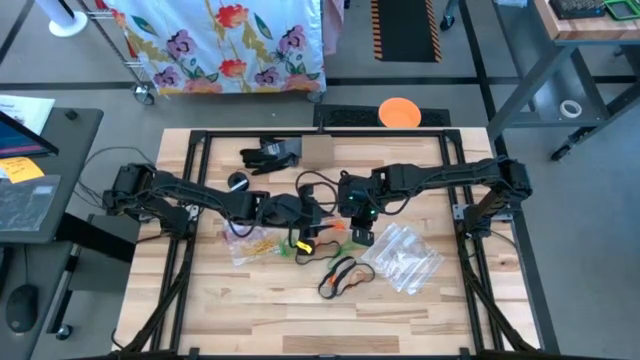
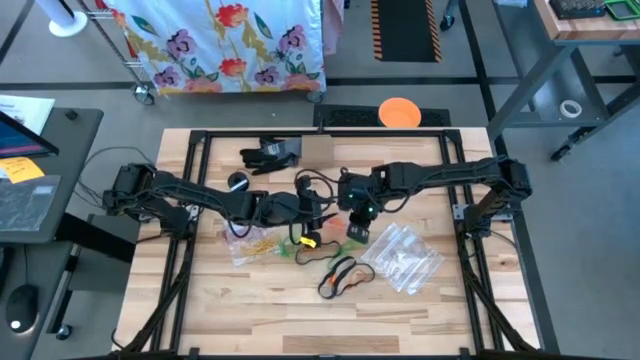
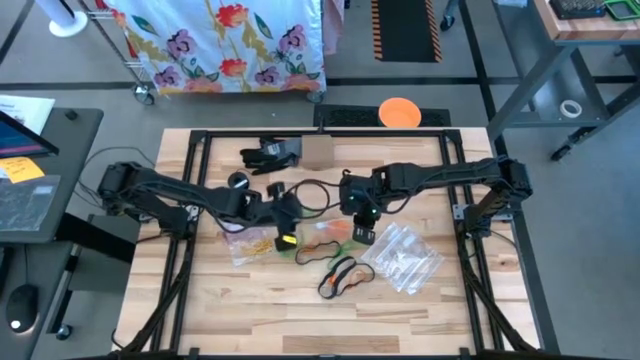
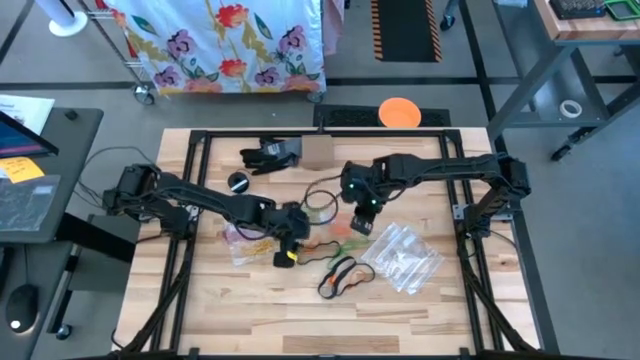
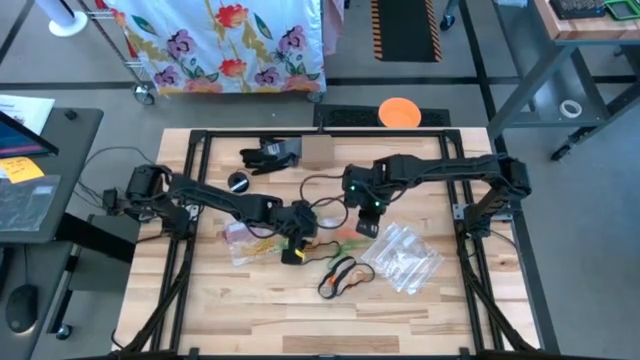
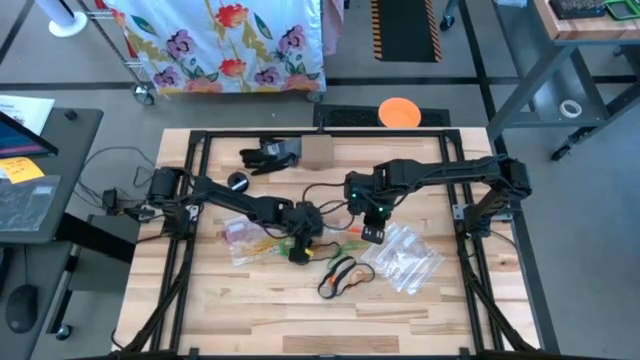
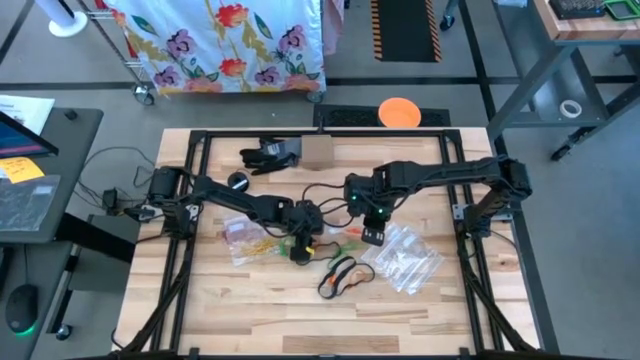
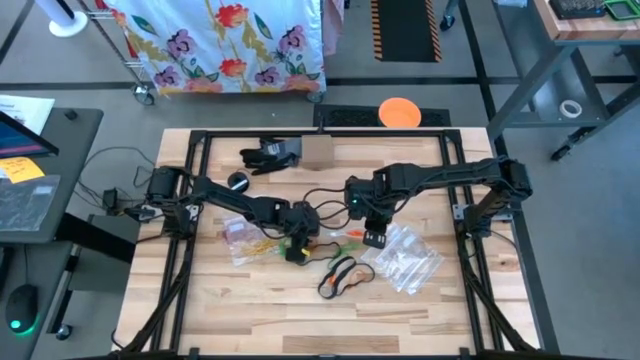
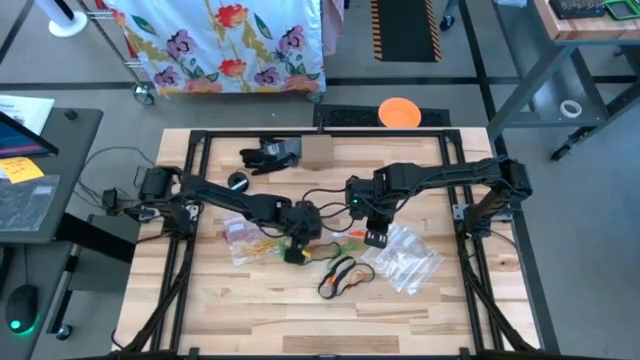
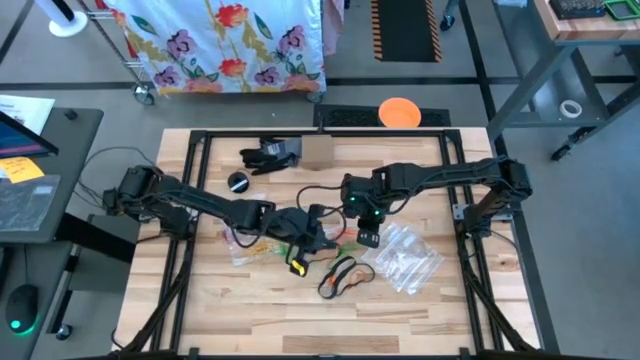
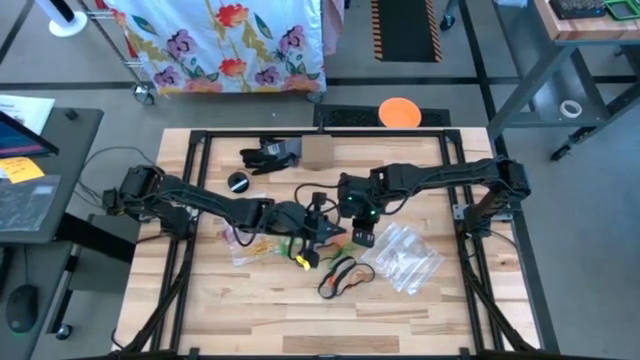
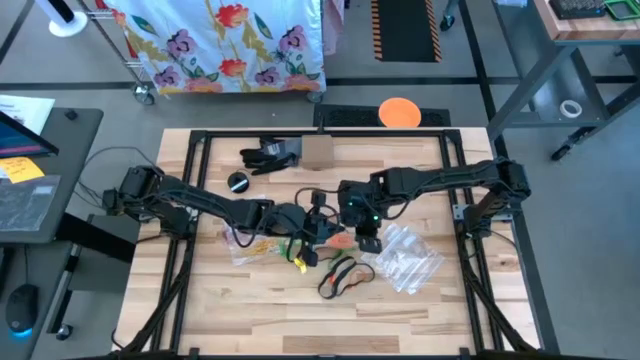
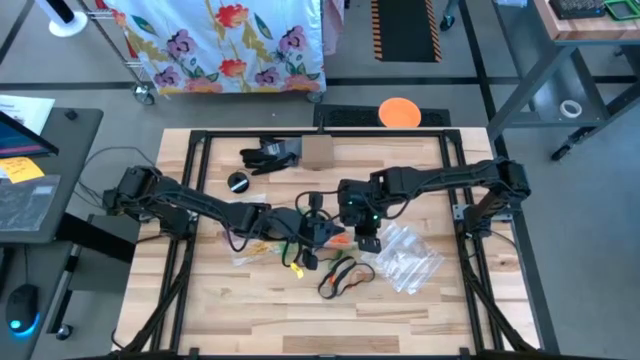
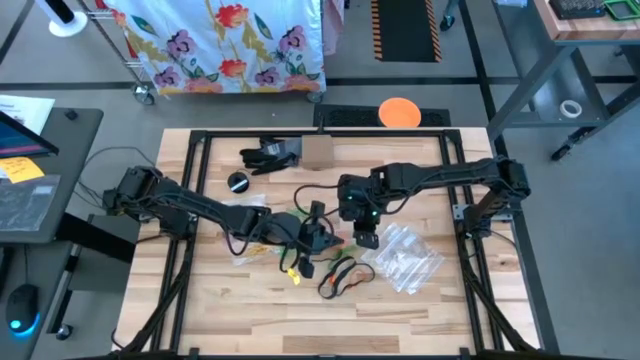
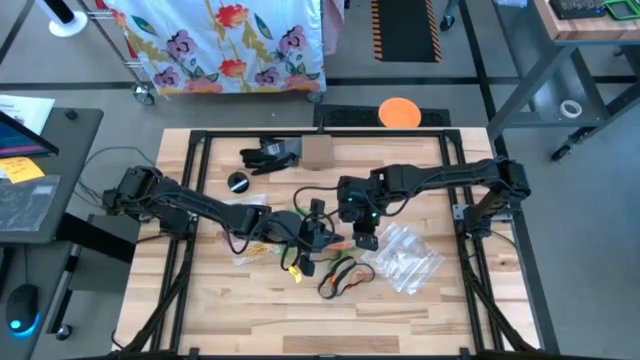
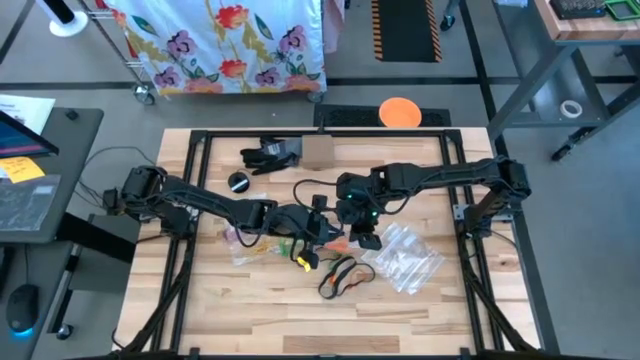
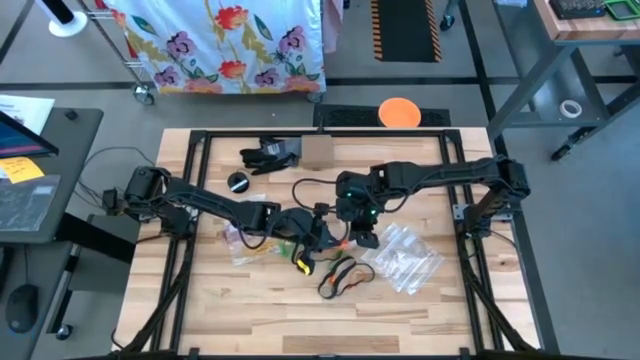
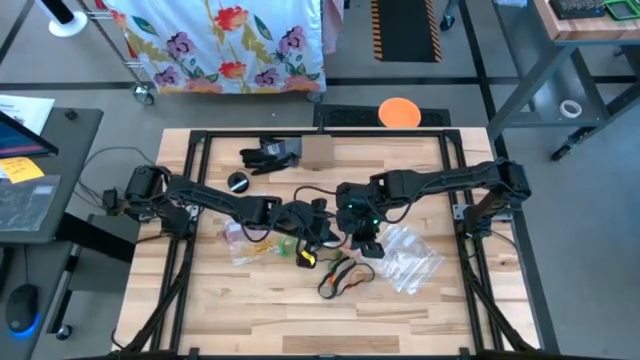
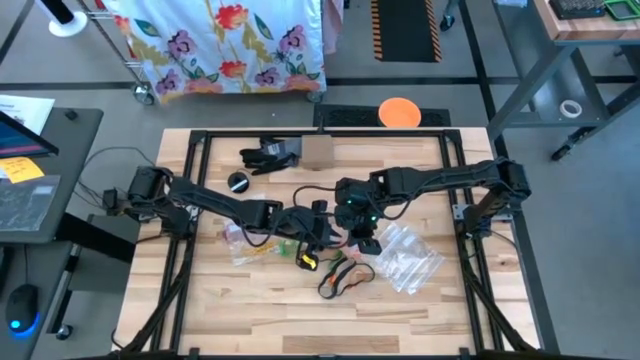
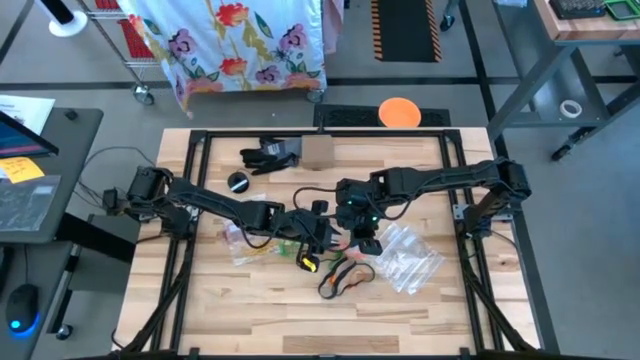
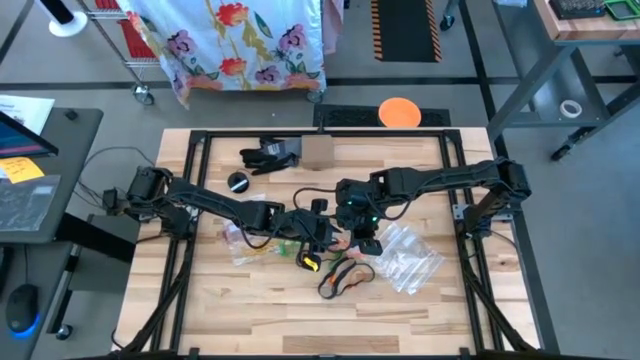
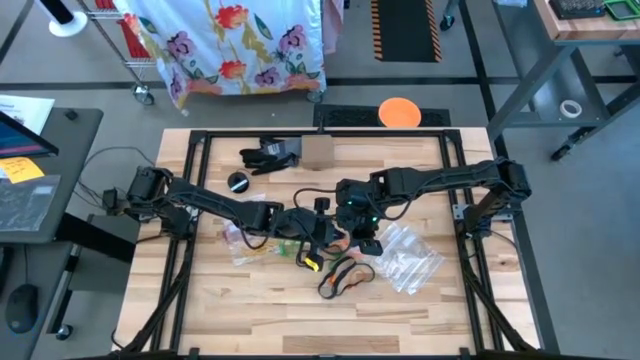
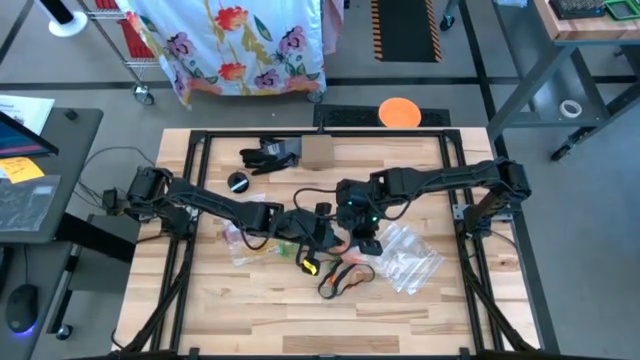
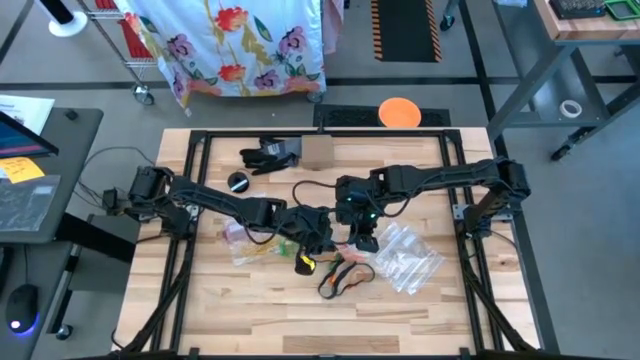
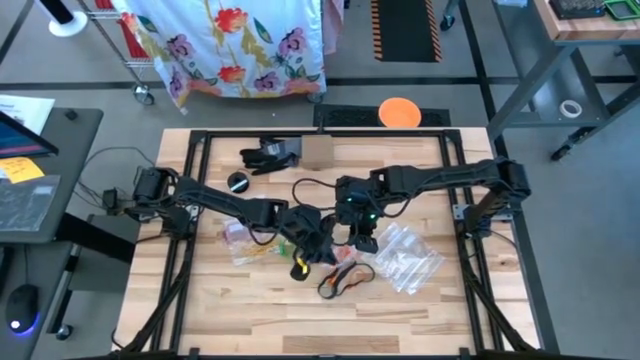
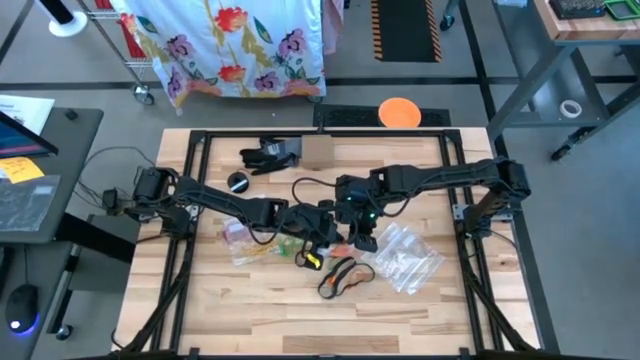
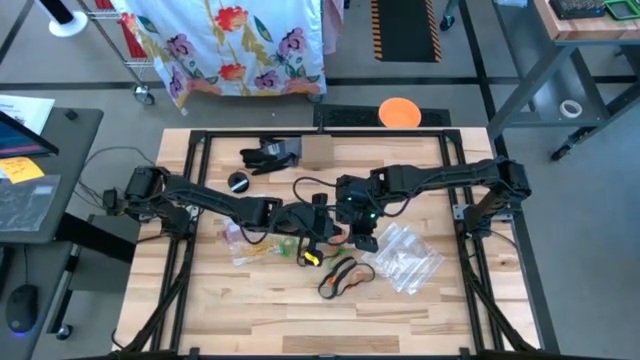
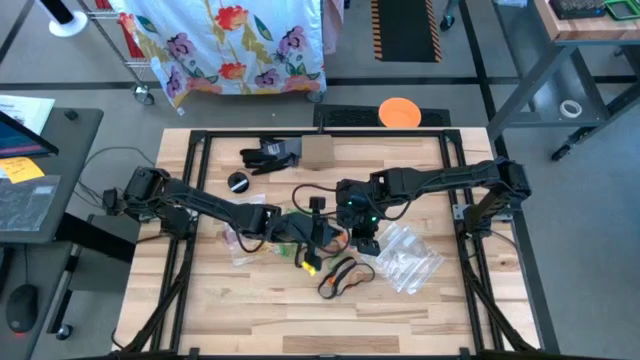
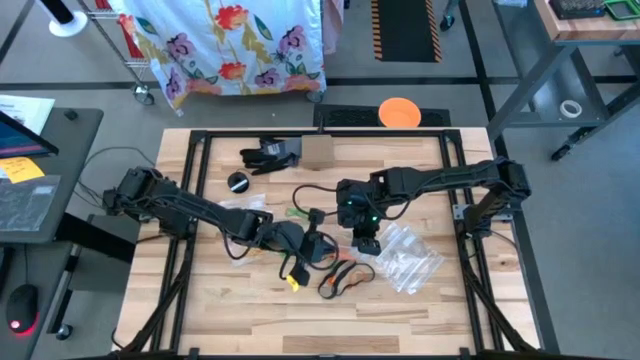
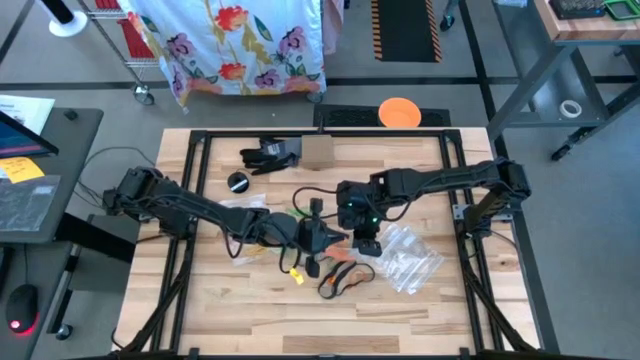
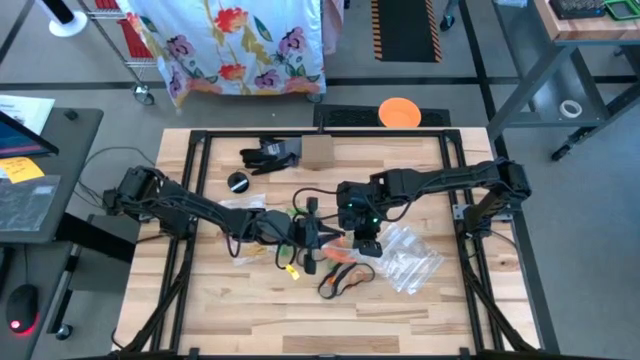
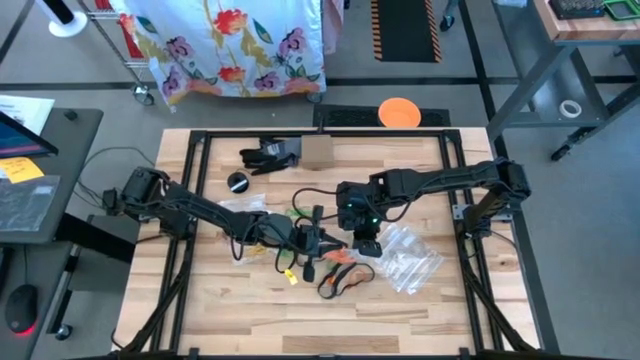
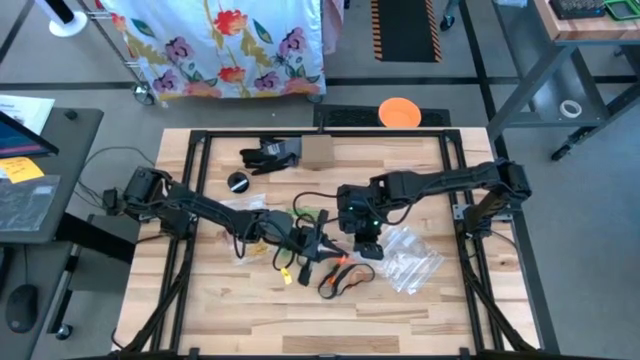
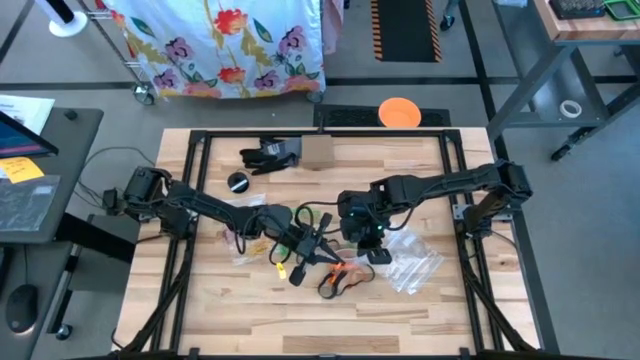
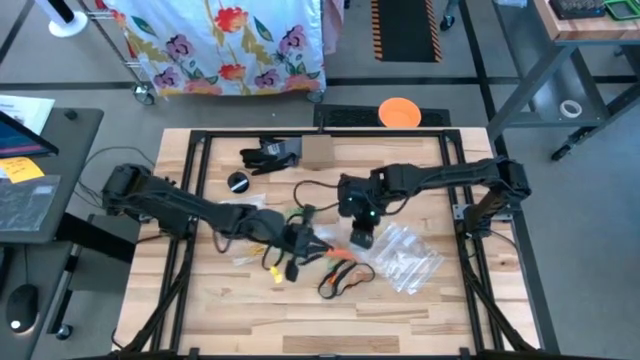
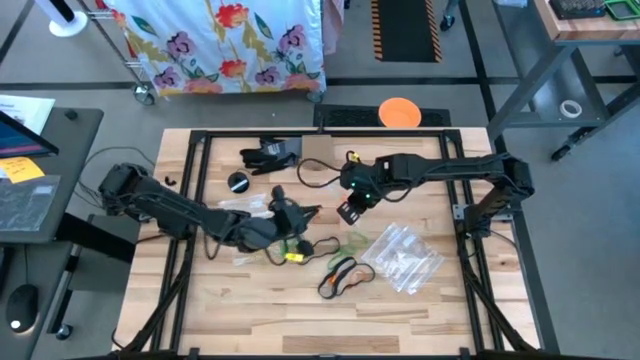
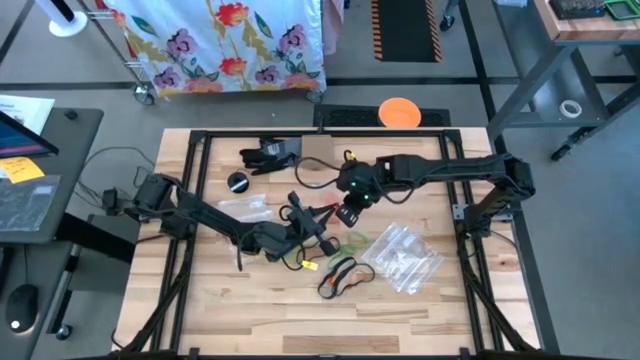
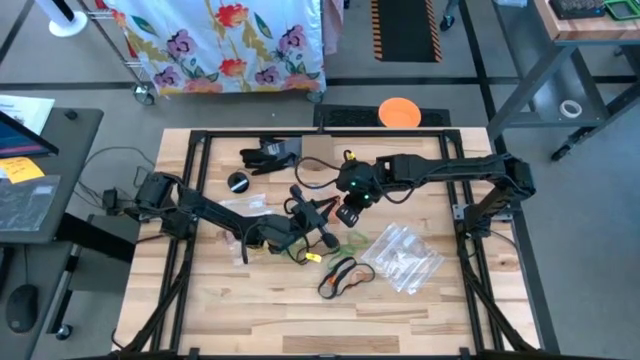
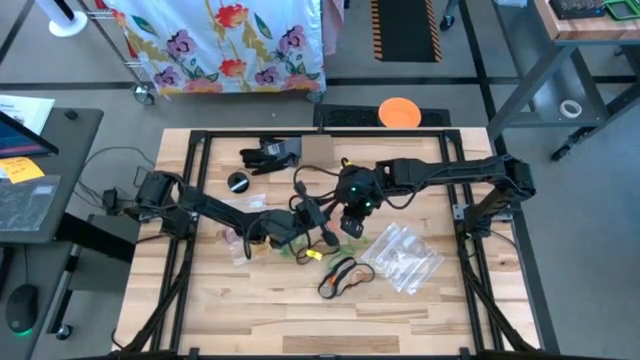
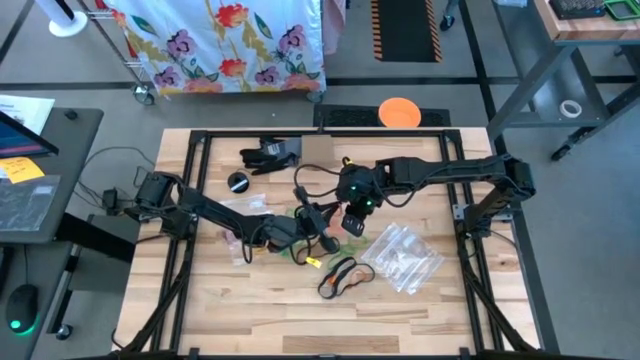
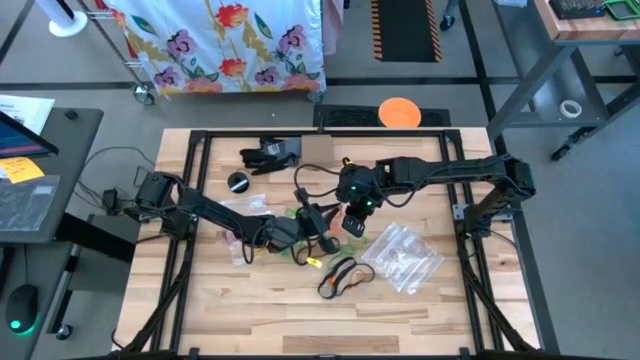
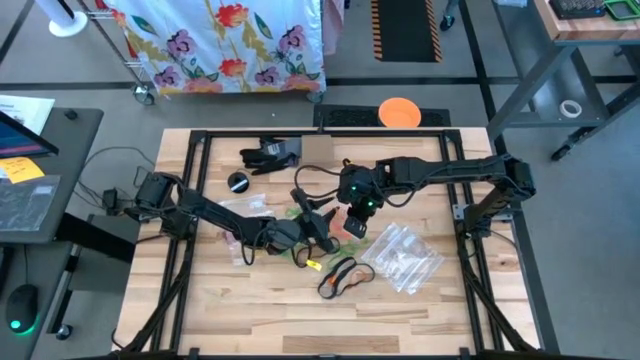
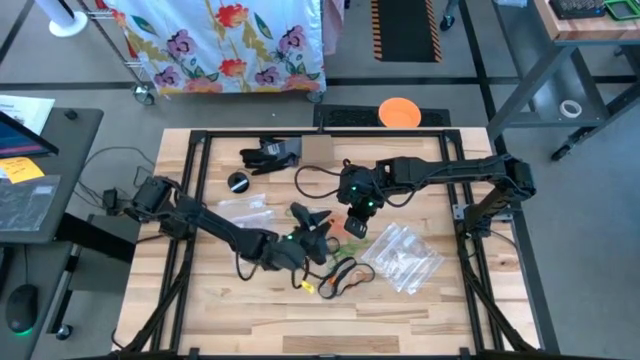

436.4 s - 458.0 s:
Task: Sort rubber bands
Put the orange rubber band into the transparent zip bag

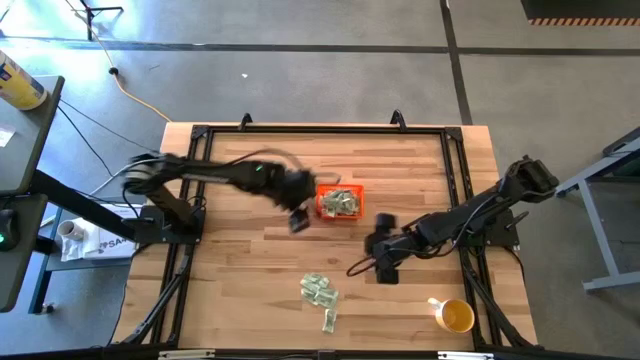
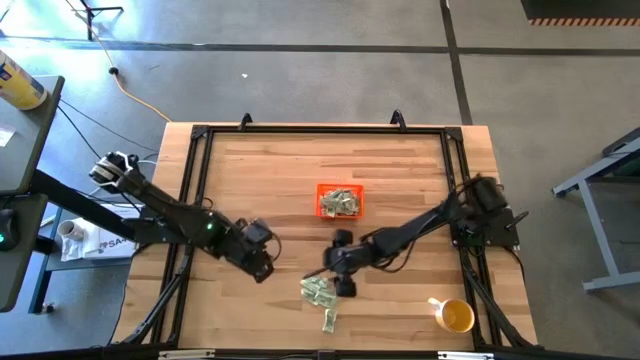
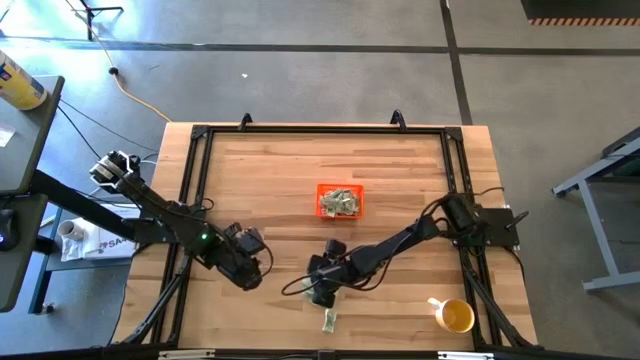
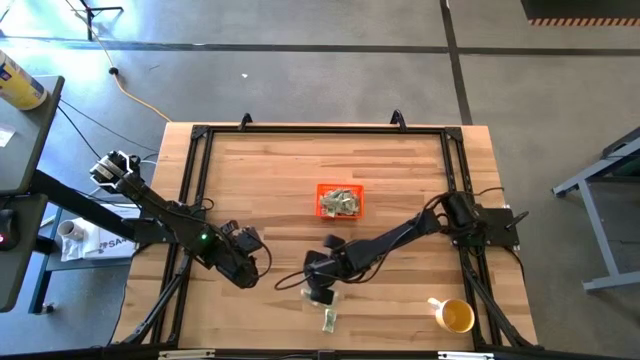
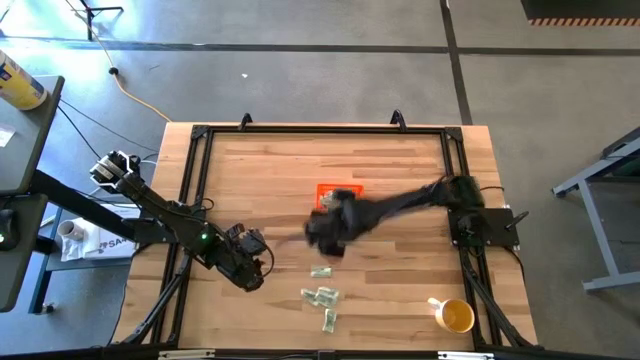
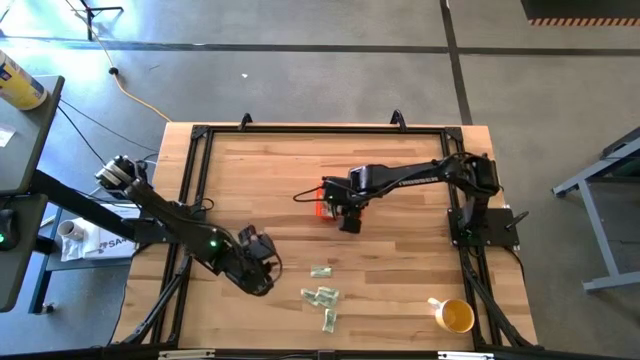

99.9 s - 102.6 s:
Task: Pick and place Stevia / Truvia into bins
Put the stevia packet into the orange bin
